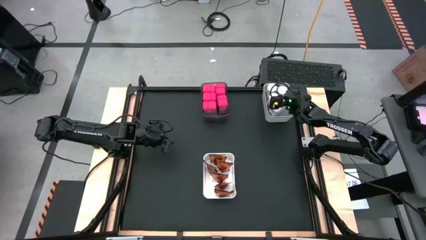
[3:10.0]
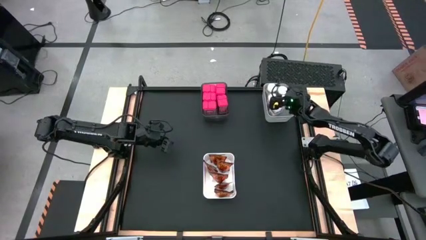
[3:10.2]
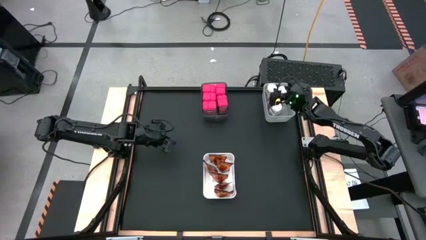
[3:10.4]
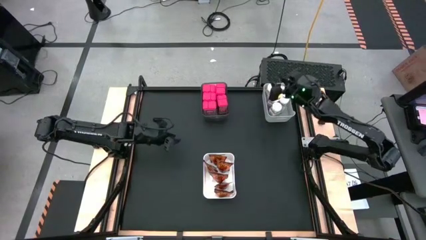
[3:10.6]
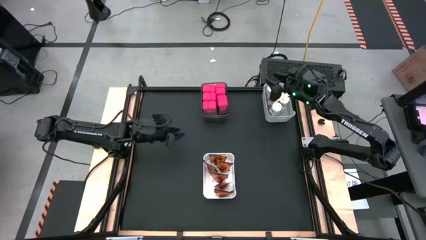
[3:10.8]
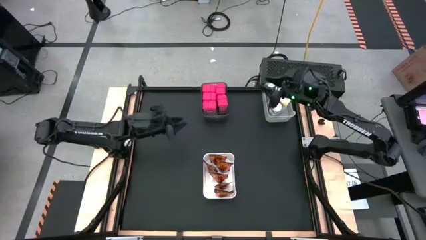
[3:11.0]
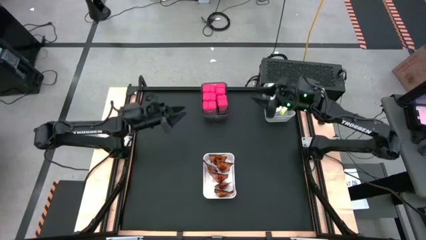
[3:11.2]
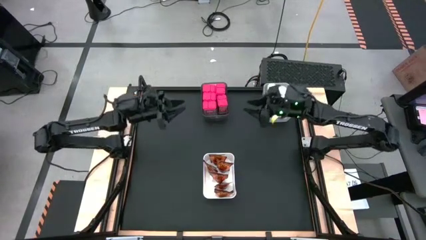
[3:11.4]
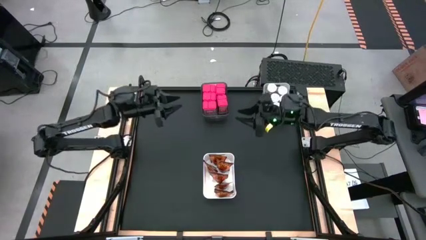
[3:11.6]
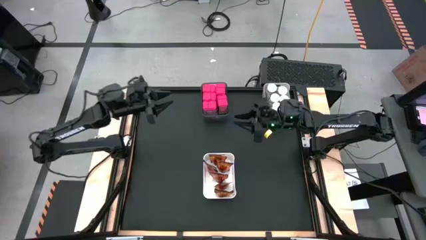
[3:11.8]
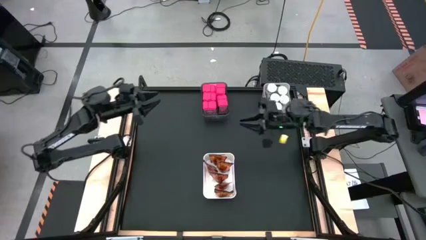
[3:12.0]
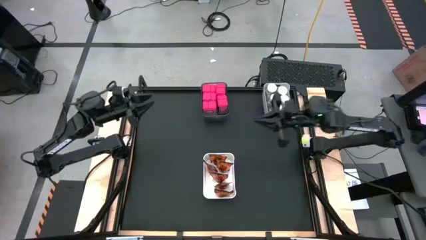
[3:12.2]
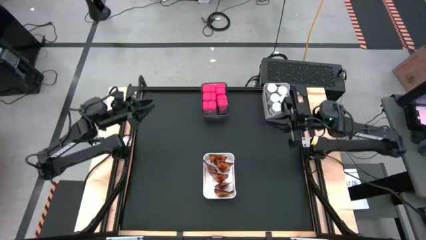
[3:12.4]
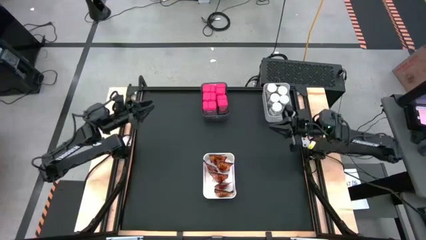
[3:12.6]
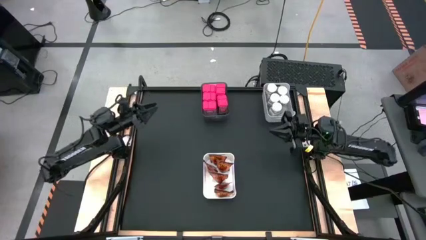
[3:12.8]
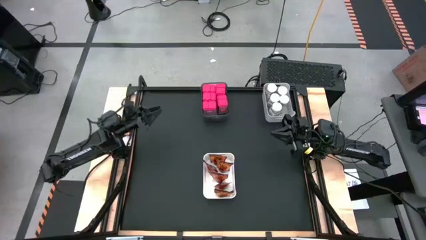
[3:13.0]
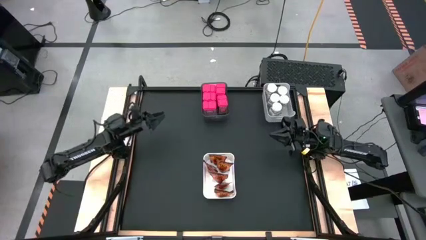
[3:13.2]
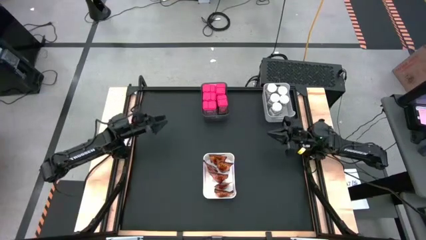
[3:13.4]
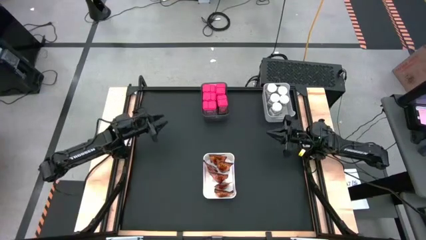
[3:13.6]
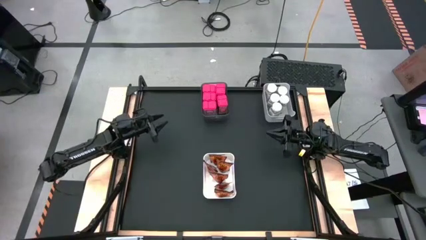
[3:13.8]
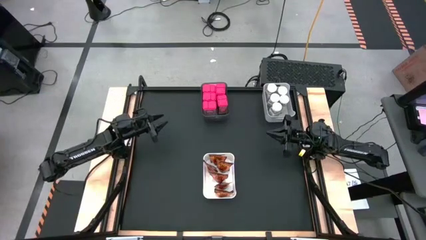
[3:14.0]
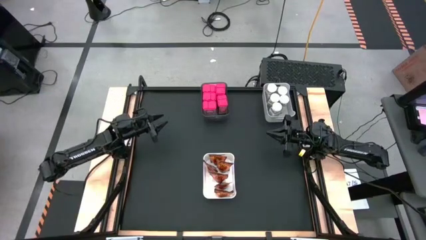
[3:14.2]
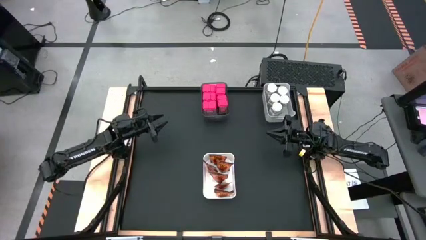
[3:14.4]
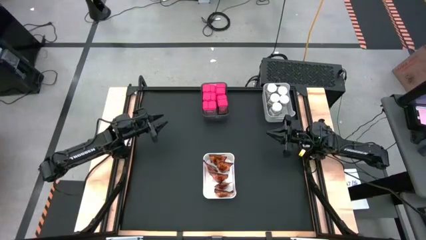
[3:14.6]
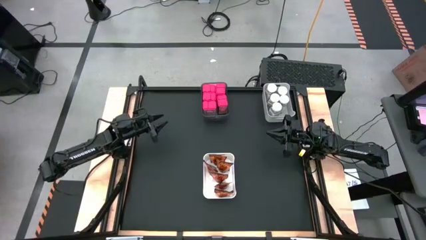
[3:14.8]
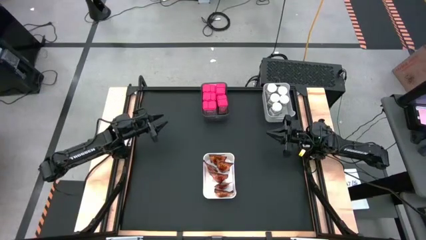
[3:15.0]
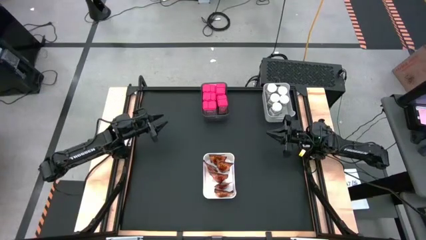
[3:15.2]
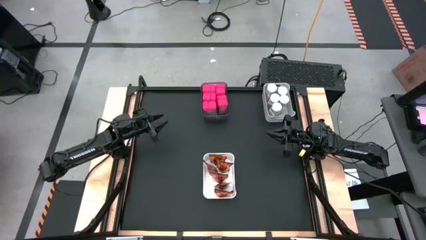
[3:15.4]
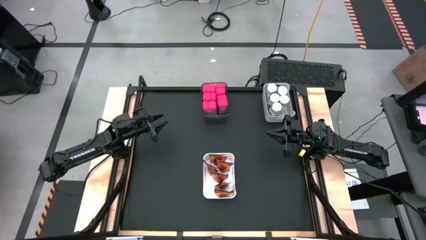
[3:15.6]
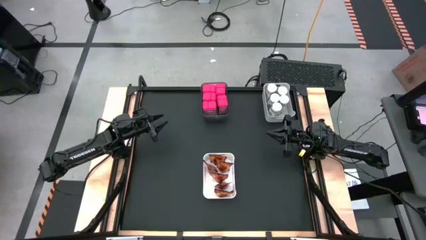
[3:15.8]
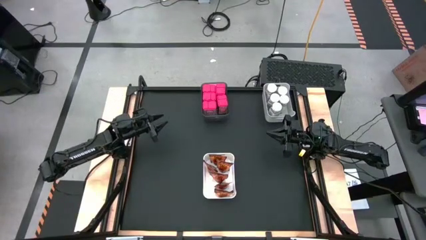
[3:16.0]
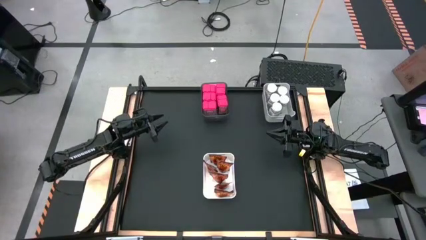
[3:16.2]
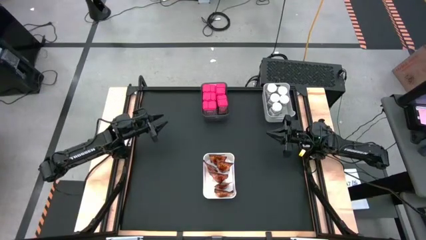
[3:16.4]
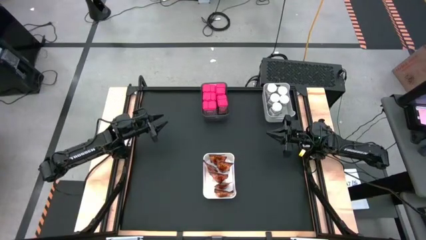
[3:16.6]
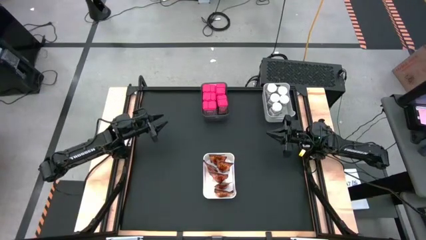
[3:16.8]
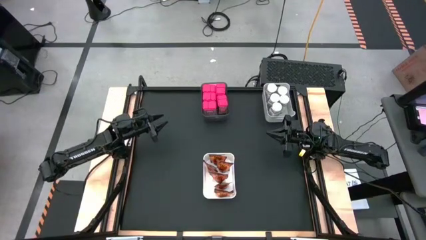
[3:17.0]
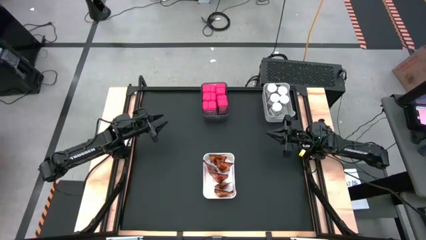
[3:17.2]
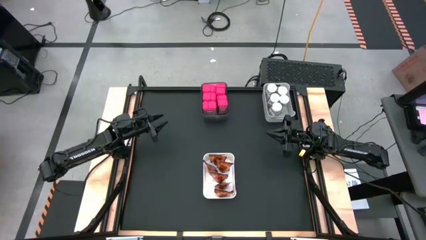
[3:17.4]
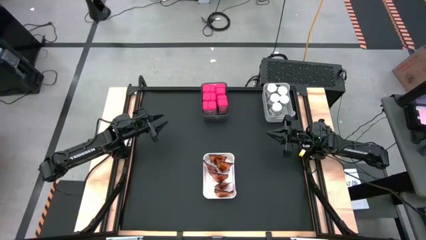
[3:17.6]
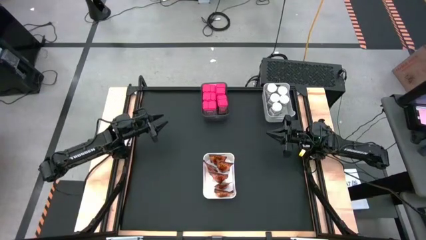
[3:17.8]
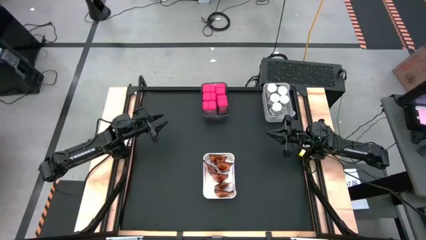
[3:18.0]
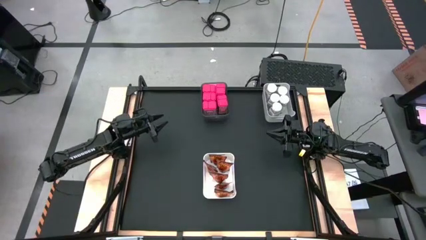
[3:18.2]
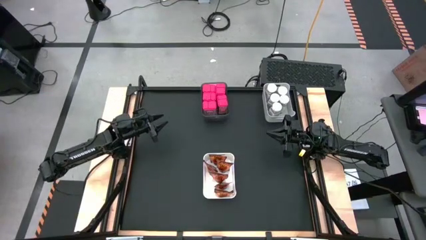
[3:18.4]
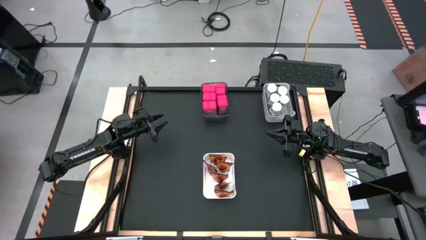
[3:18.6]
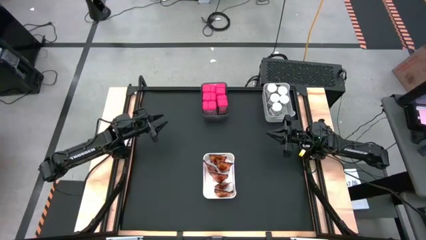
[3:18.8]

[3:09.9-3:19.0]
Task: Sort spices by type
Return to Home Position

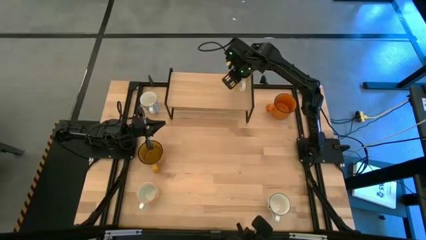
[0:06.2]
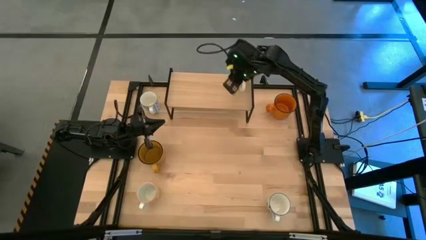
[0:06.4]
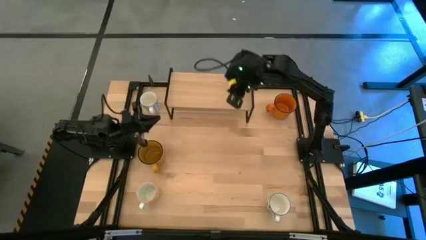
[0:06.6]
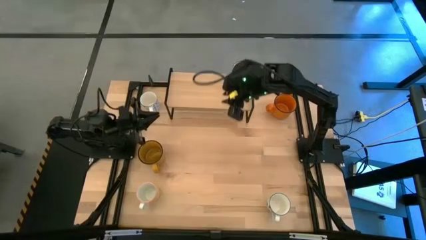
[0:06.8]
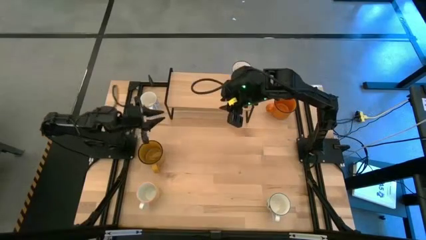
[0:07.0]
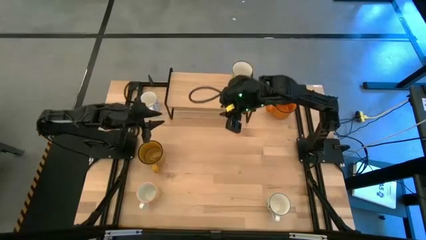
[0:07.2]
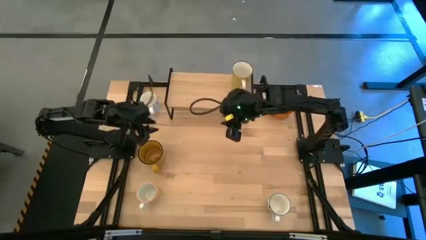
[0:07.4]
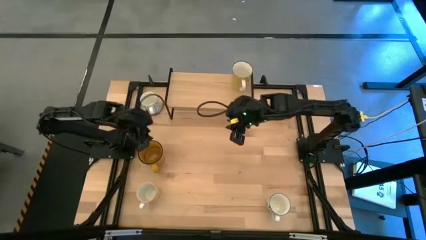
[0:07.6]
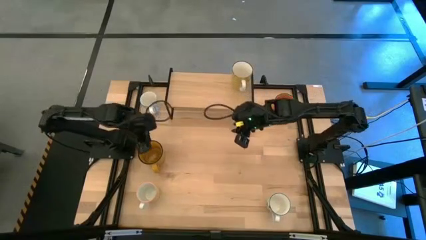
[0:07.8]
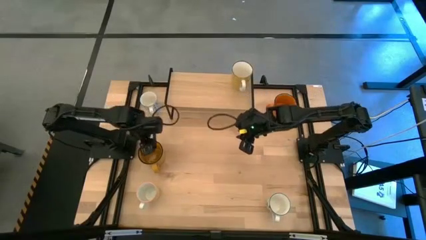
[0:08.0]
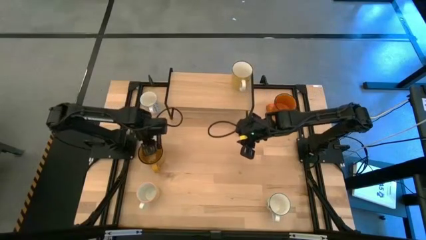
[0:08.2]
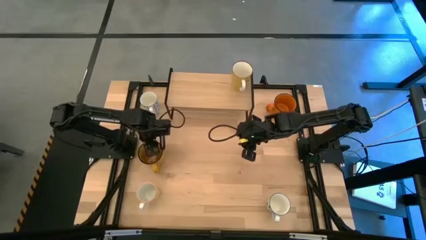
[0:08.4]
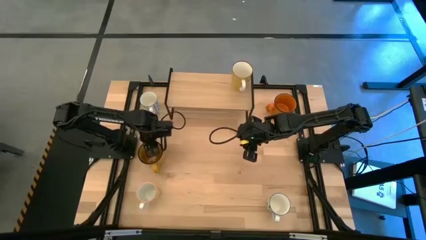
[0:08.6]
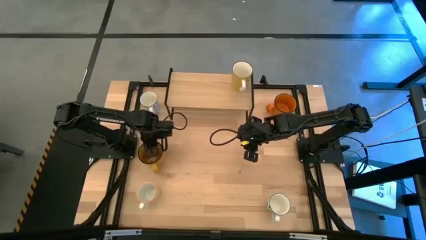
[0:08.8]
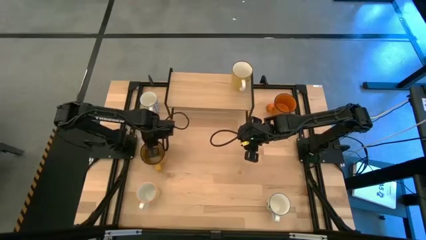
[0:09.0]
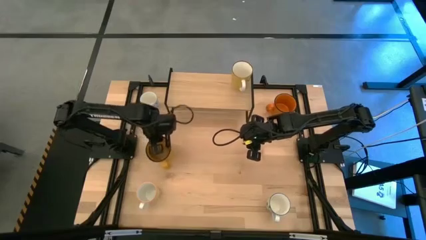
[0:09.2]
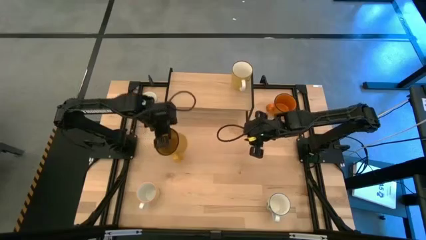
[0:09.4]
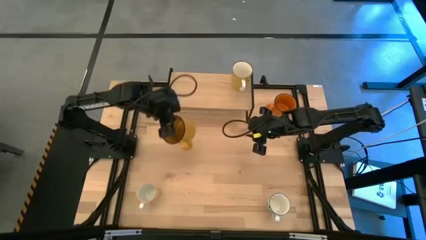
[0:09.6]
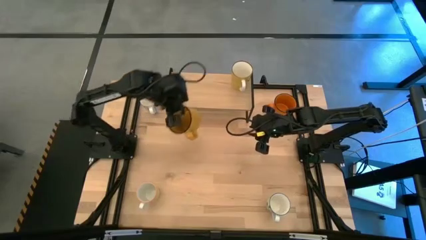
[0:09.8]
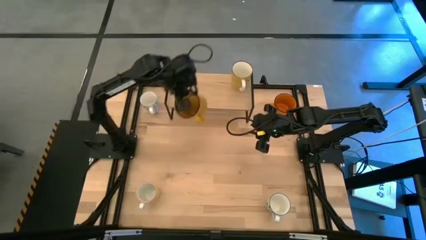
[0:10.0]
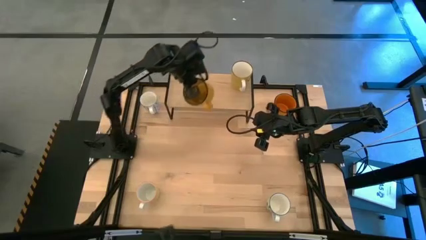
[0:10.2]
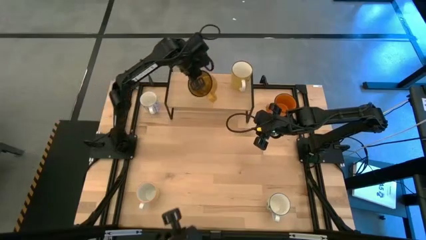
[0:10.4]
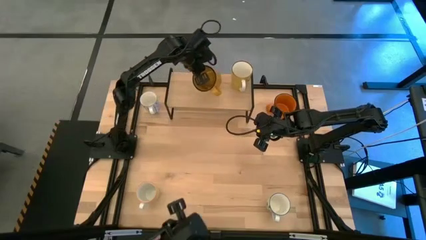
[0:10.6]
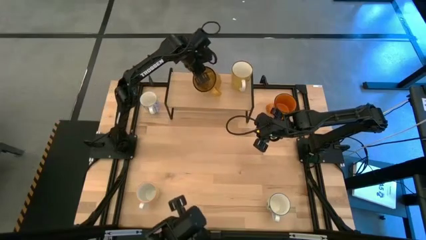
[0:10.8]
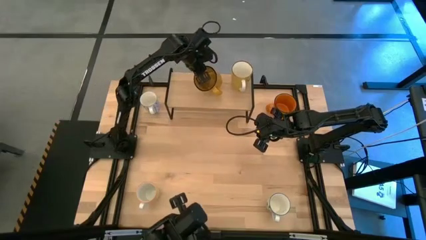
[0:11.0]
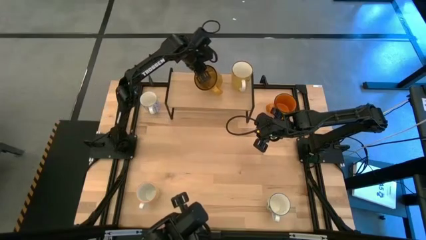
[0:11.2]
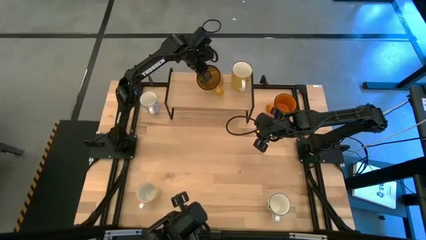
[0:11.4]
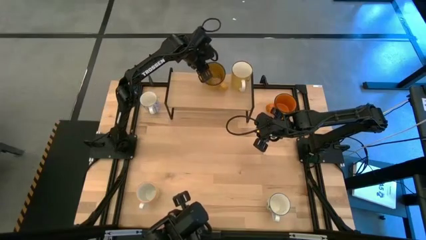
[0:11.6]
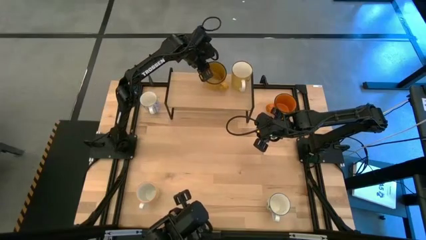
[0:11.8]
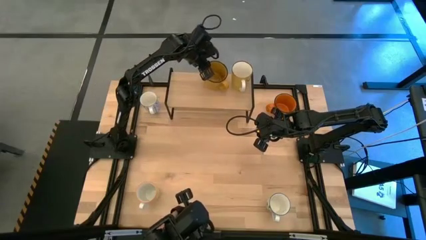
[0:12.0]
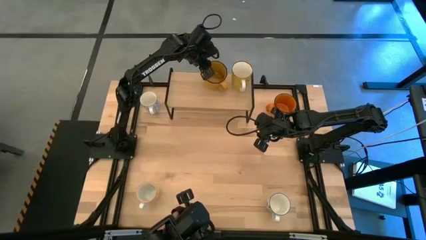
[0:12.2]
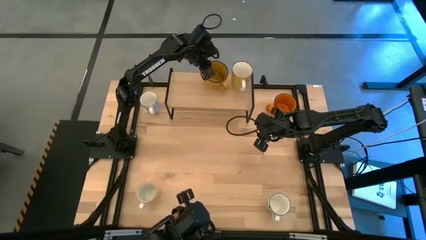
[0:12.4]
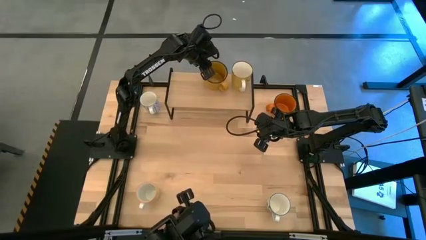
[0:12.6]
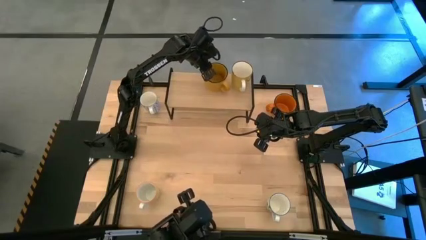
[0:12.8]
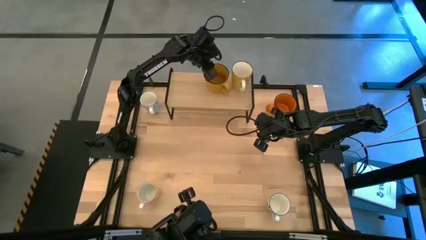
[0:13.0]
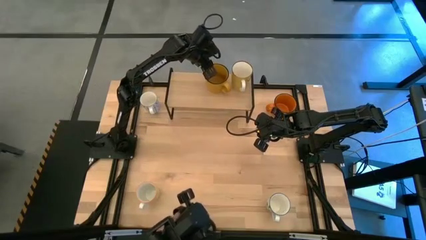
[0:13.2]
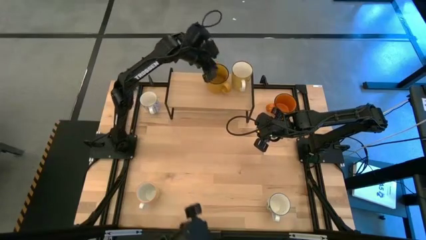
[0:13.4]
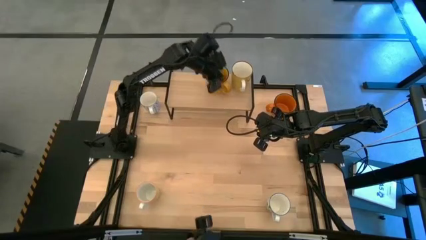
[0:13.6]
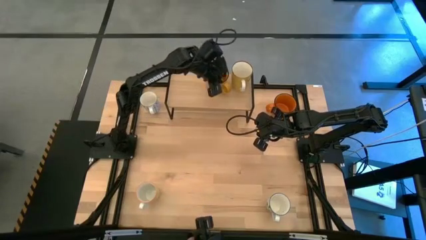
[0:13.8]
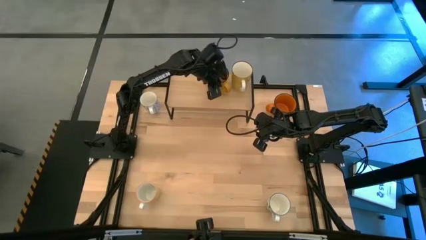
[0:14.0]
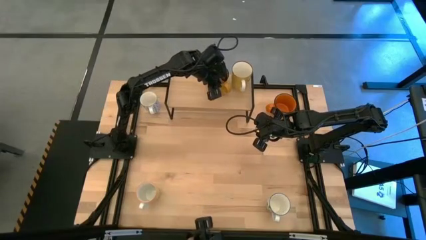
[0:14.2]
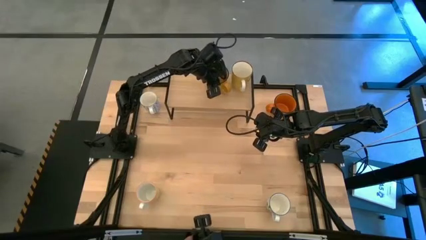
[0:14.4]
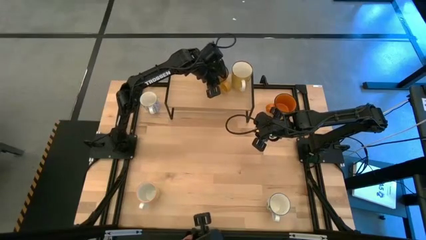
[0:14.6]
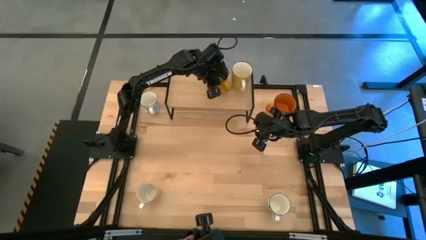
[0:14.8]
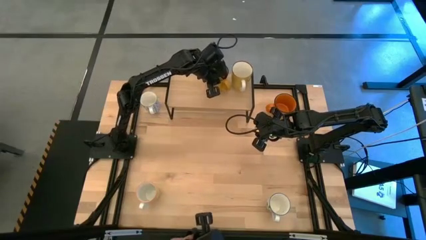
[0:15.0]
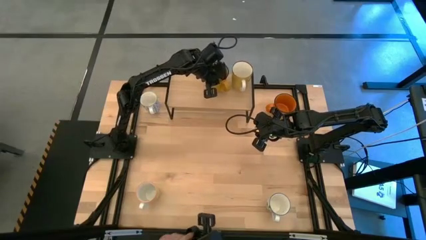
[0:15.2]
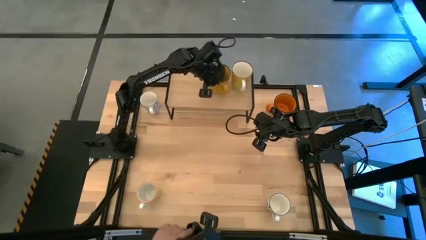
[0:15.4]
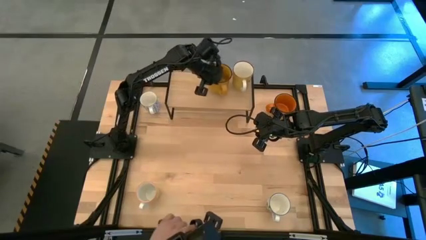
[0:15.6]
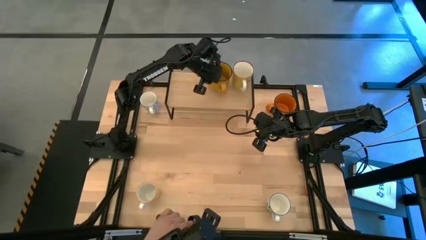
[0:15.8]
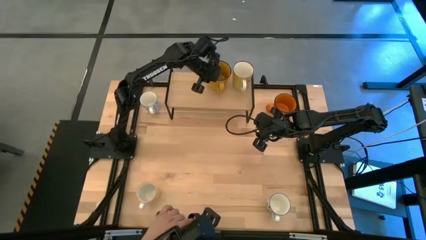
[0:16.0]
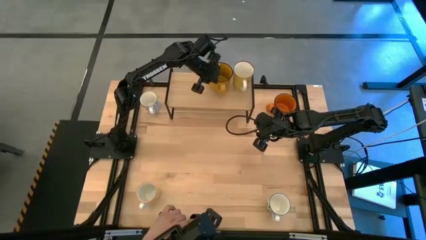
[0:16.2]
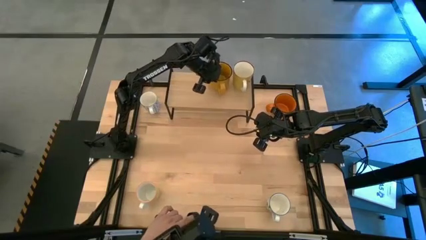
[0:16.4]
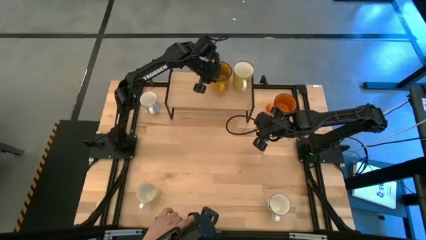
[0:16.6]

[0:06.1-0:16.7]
Task: Place coffee mugs
Put the yellow mug on the shelf
